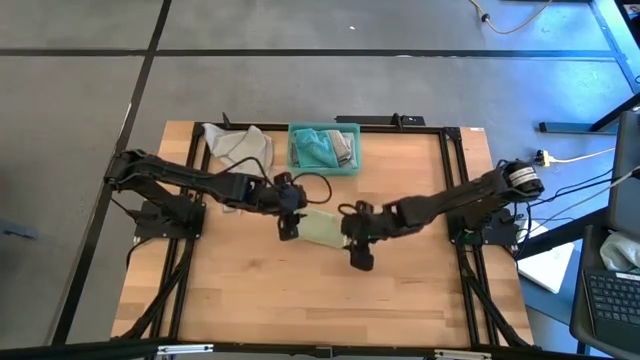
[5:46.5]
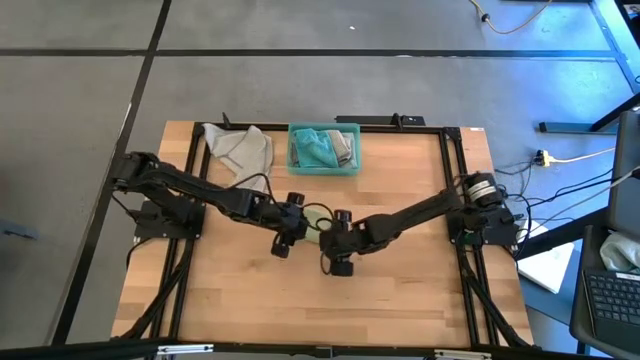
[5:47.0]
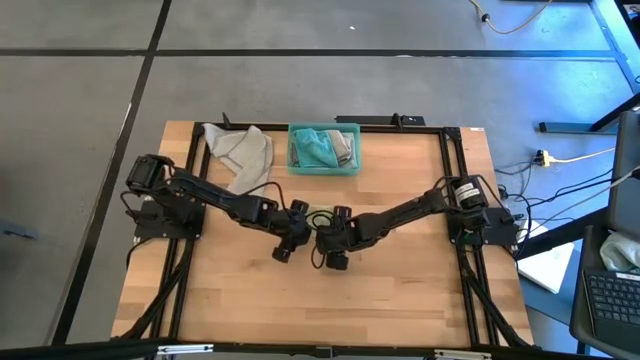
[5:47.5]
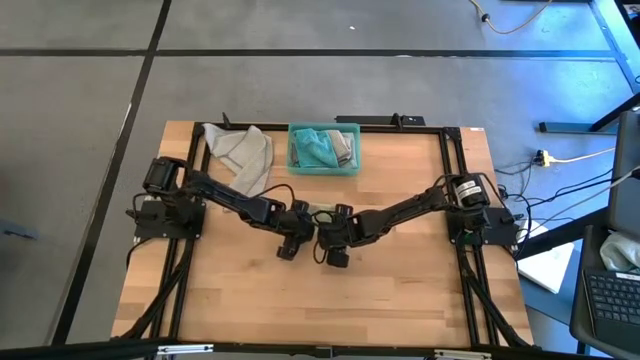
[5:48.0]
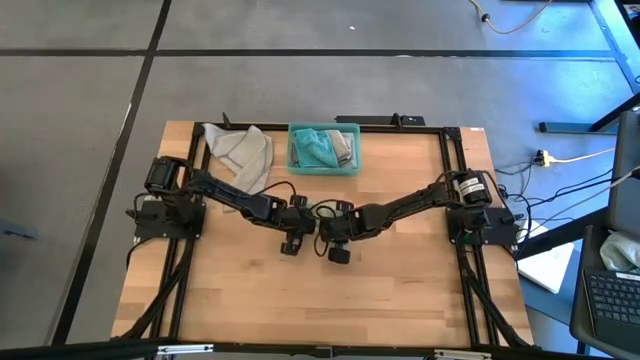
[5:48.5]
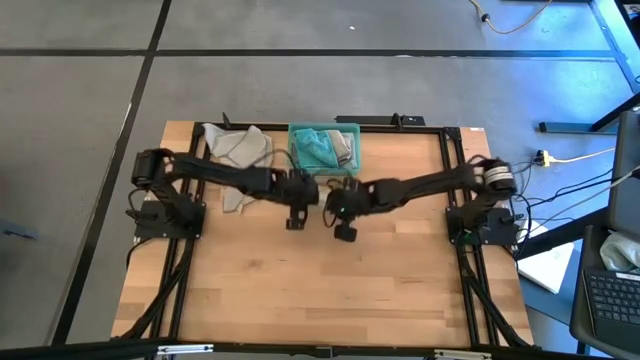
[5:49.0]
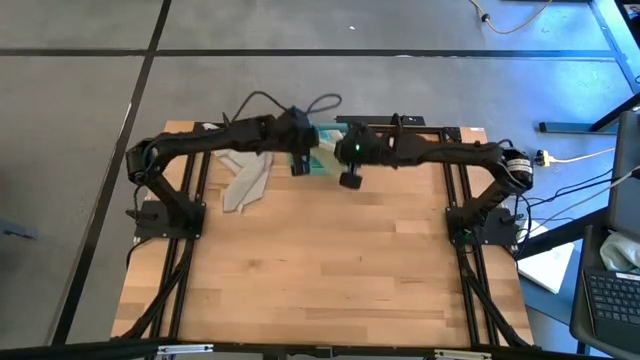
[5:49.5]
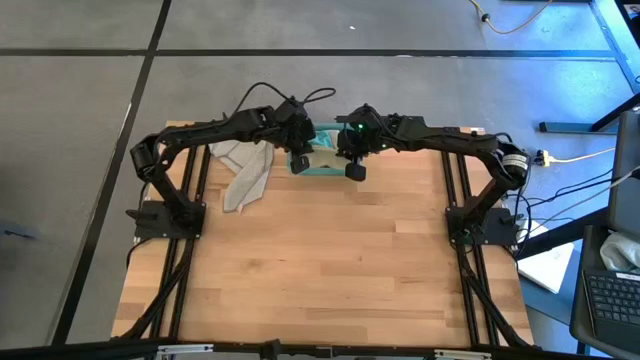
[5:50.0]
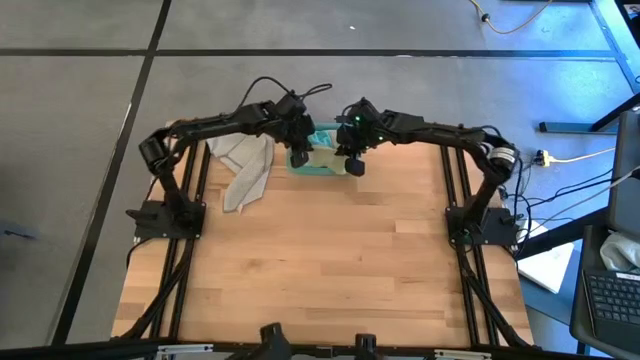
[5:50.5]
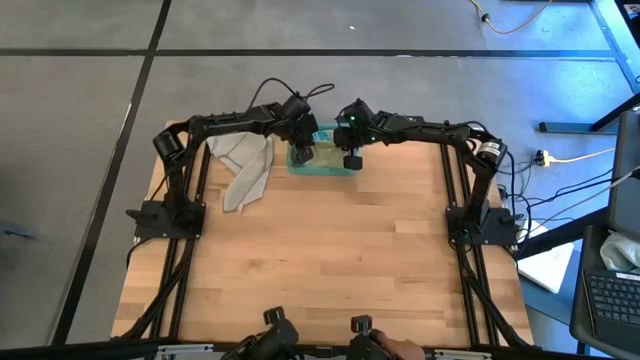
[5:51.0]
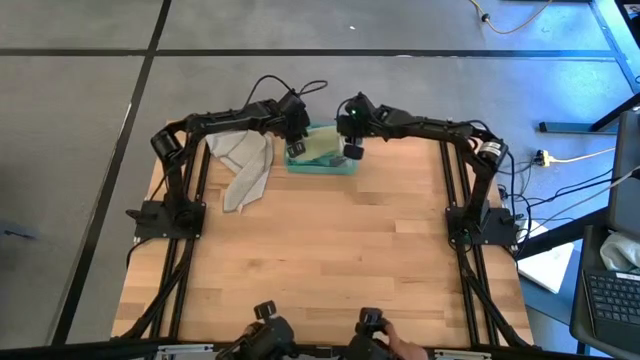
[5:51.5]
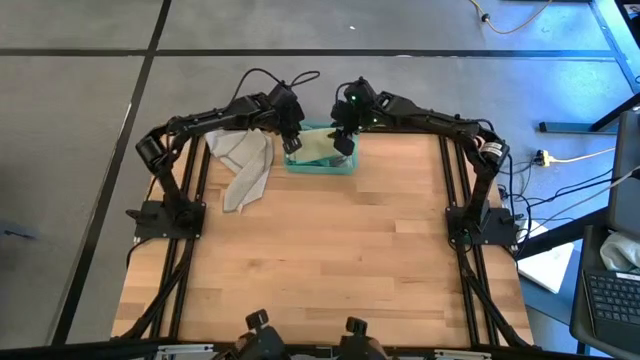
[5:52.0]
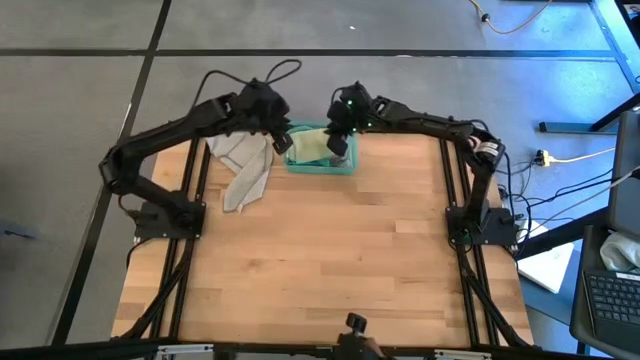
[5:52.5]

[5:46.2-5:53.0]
Task: Fold microfiber towels
Put the folded green towel into the bin

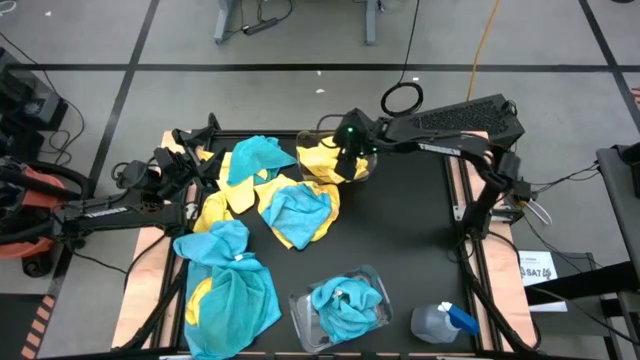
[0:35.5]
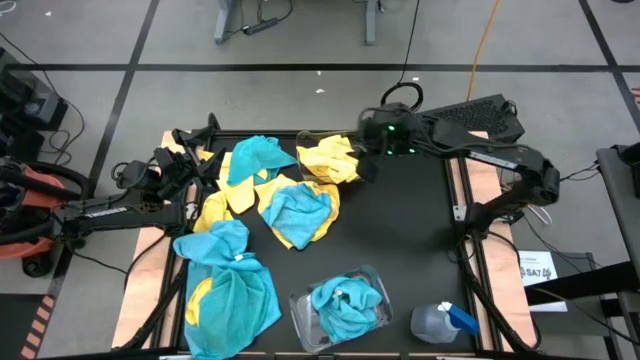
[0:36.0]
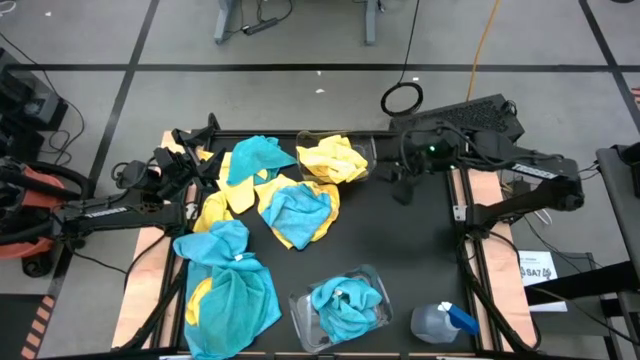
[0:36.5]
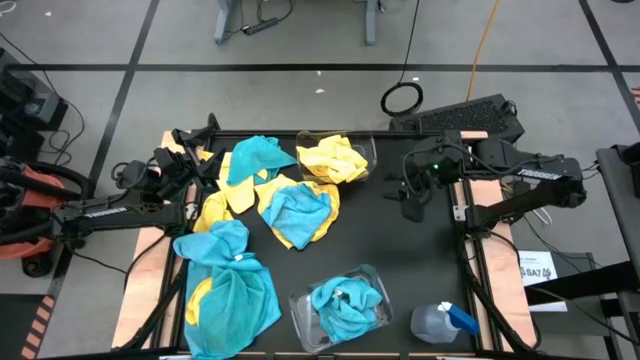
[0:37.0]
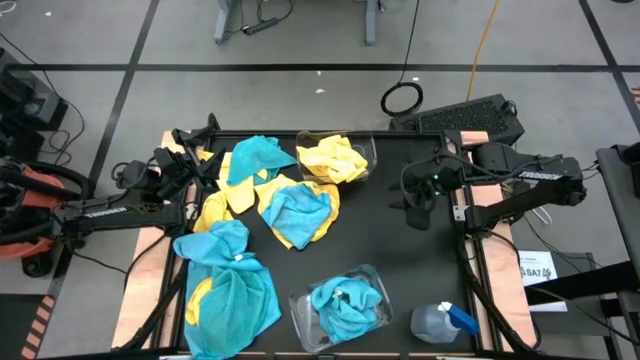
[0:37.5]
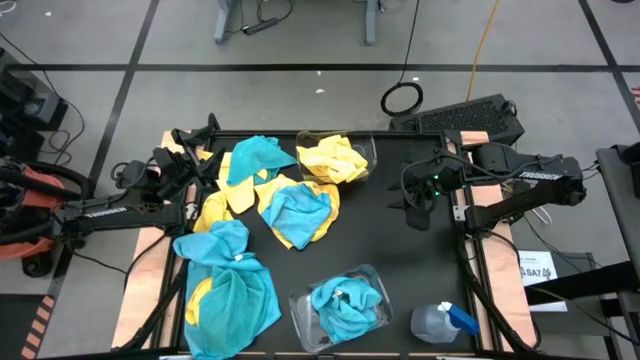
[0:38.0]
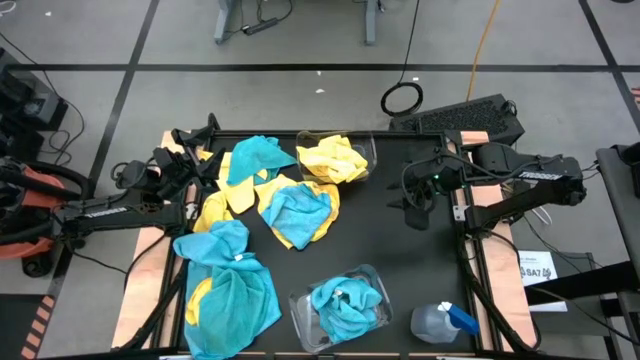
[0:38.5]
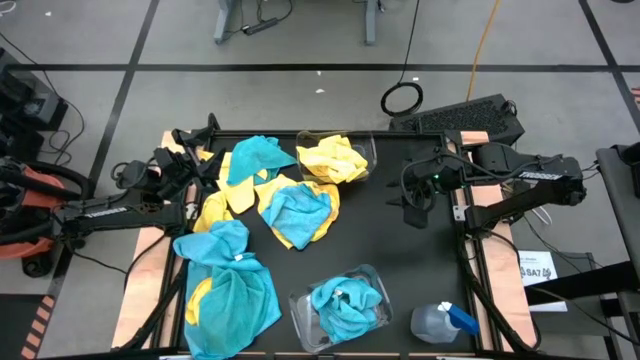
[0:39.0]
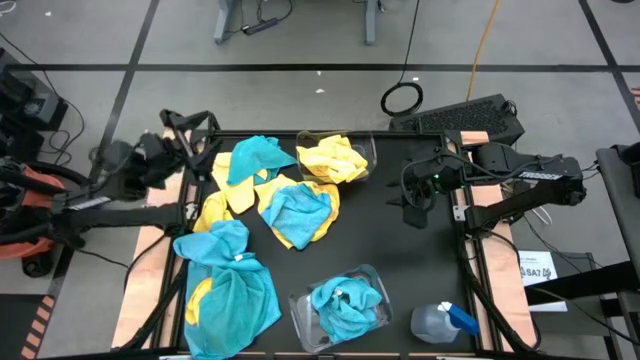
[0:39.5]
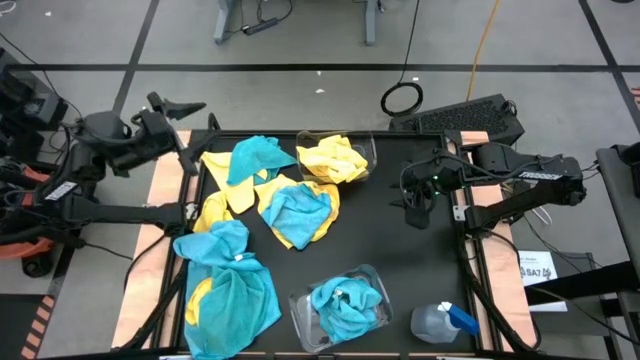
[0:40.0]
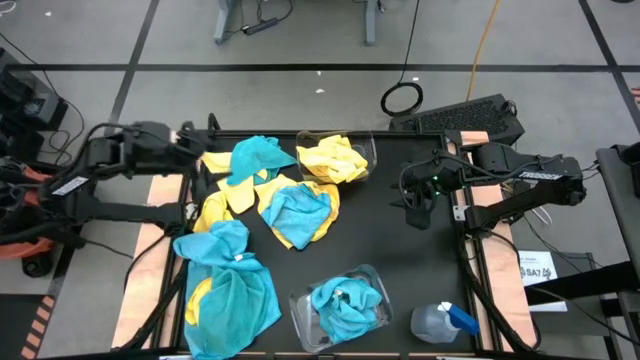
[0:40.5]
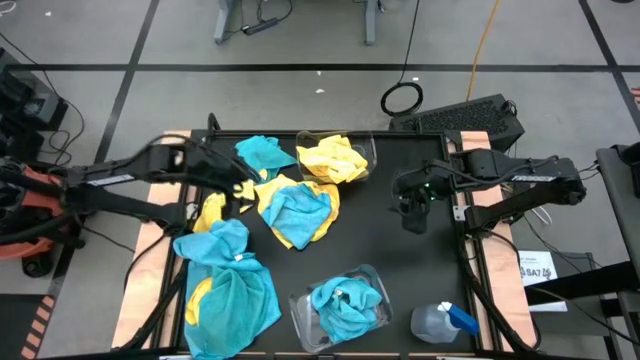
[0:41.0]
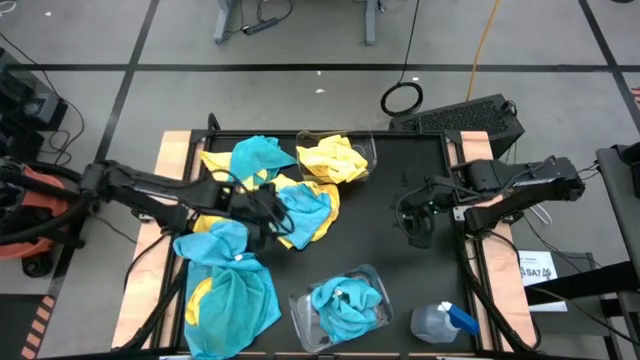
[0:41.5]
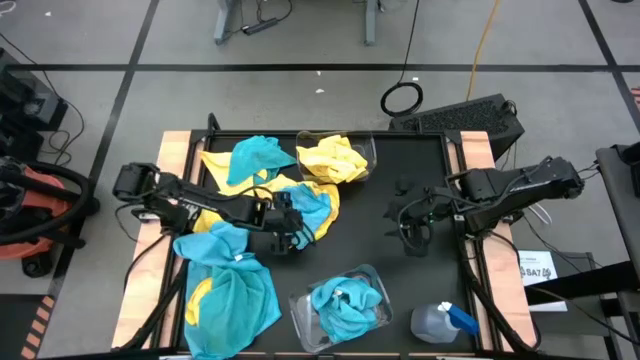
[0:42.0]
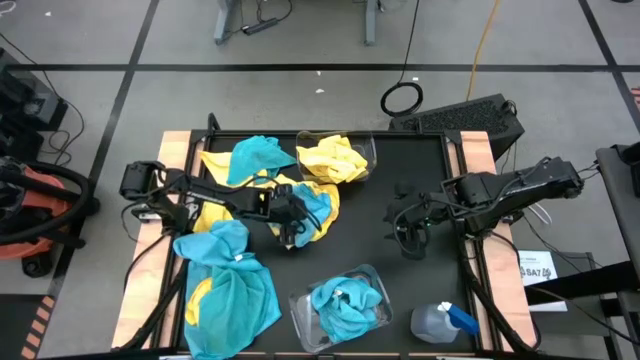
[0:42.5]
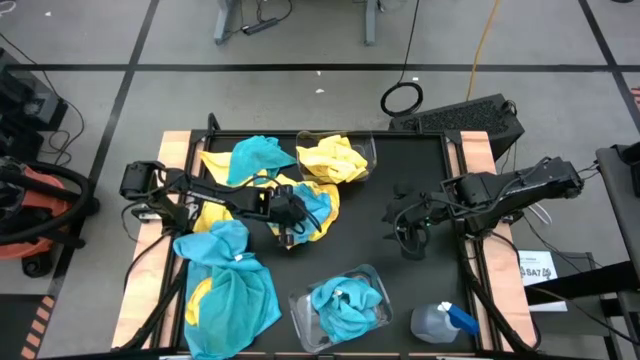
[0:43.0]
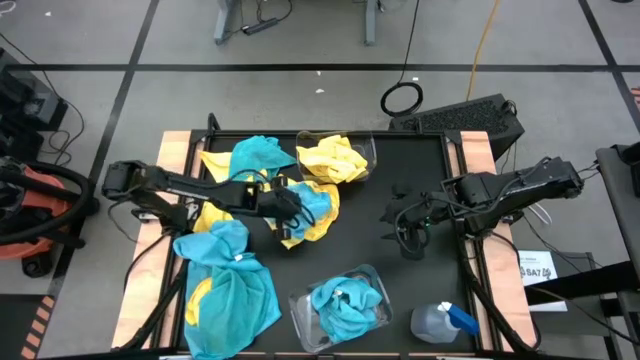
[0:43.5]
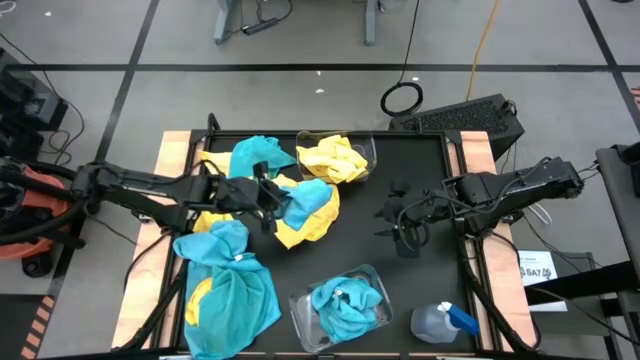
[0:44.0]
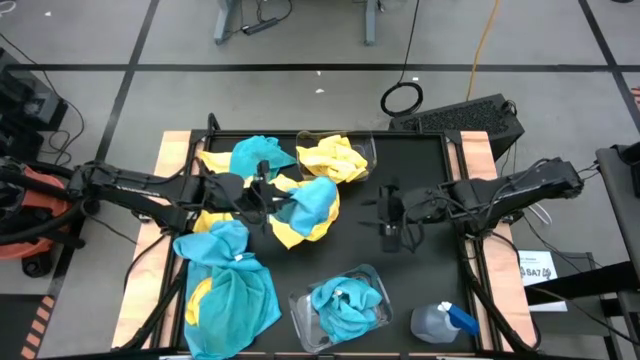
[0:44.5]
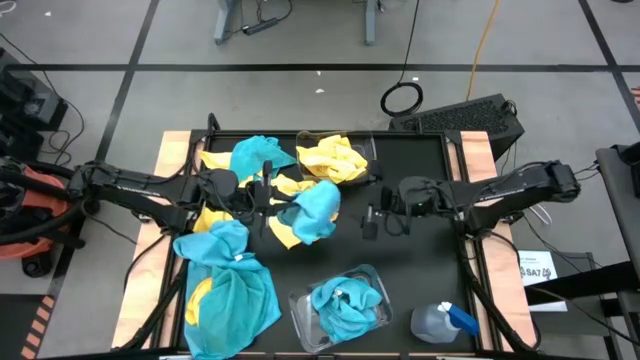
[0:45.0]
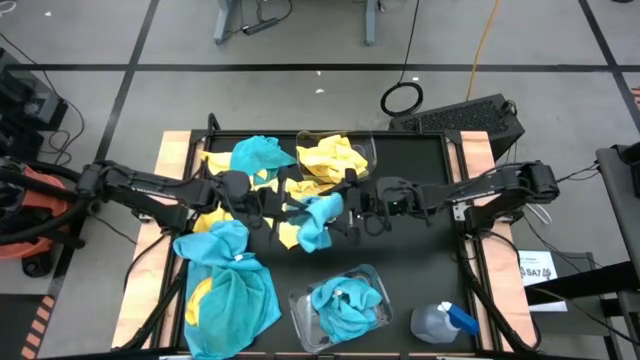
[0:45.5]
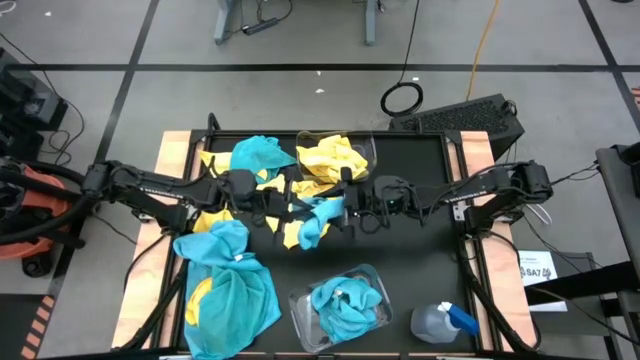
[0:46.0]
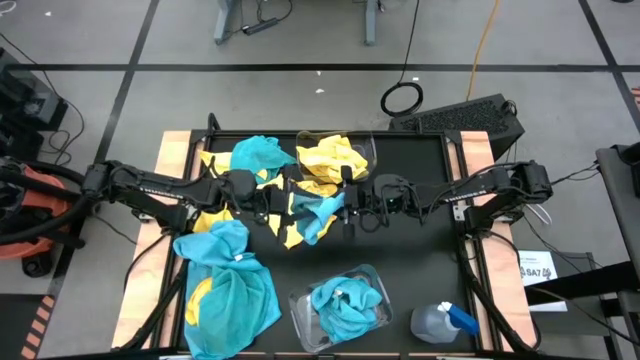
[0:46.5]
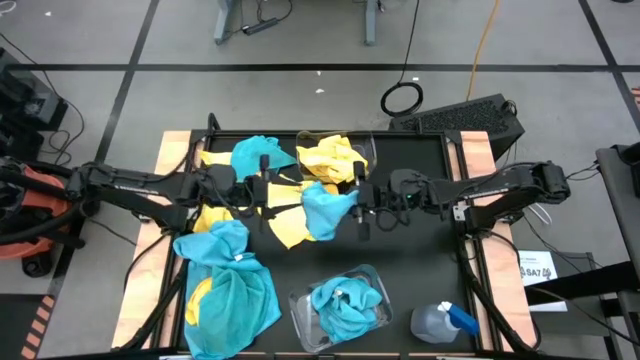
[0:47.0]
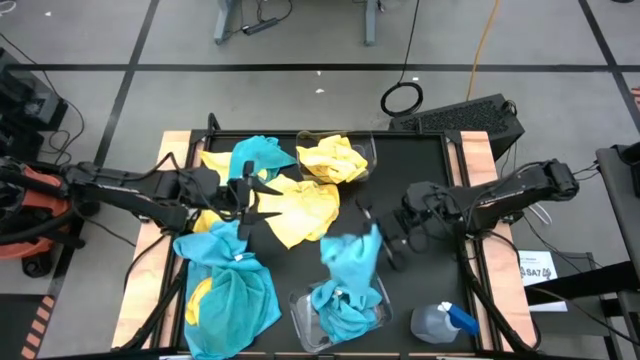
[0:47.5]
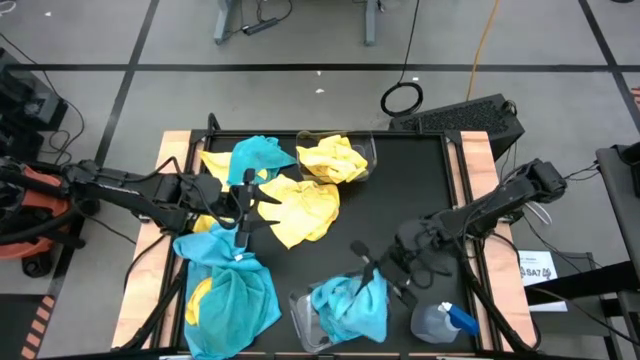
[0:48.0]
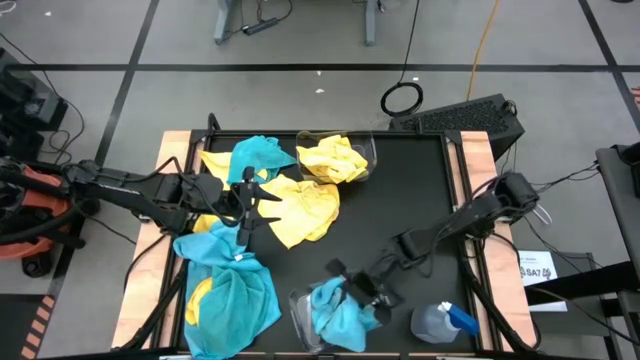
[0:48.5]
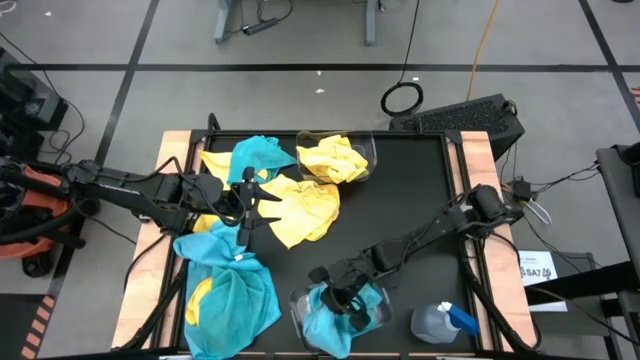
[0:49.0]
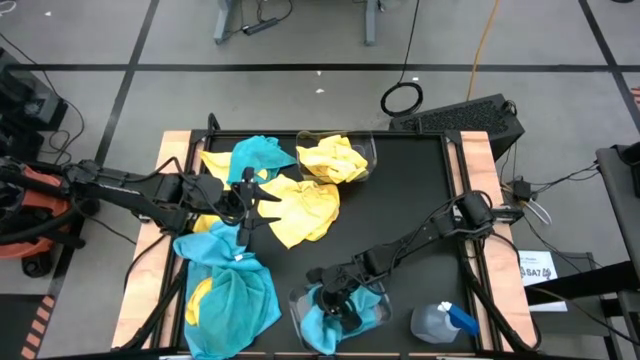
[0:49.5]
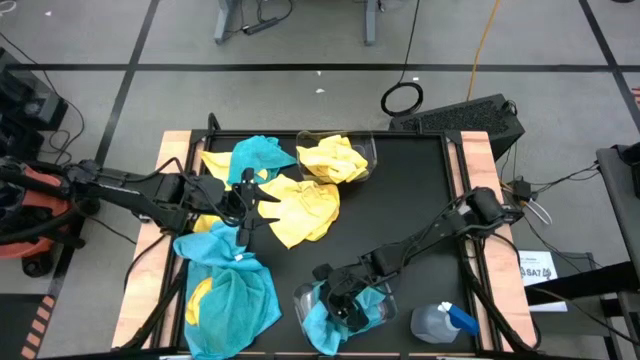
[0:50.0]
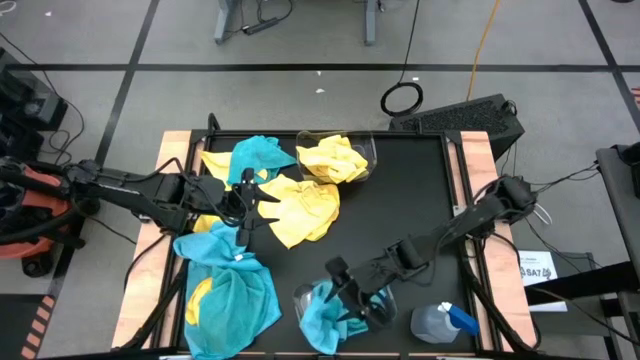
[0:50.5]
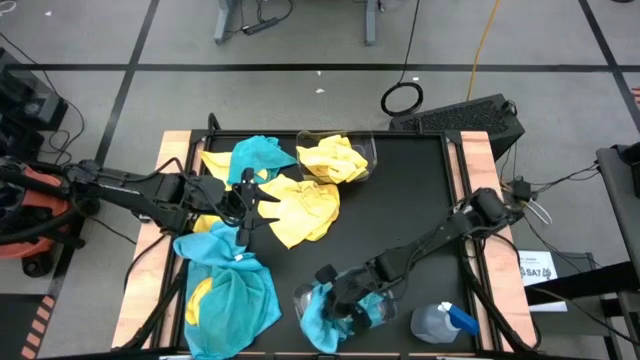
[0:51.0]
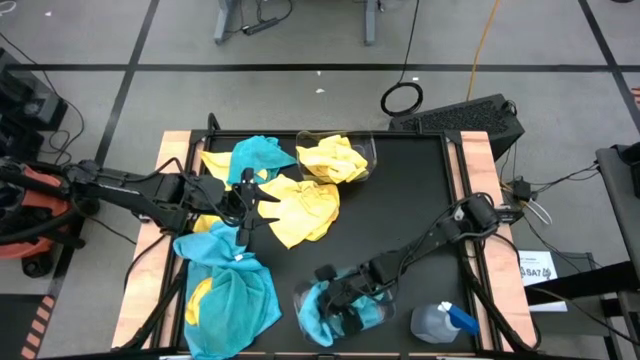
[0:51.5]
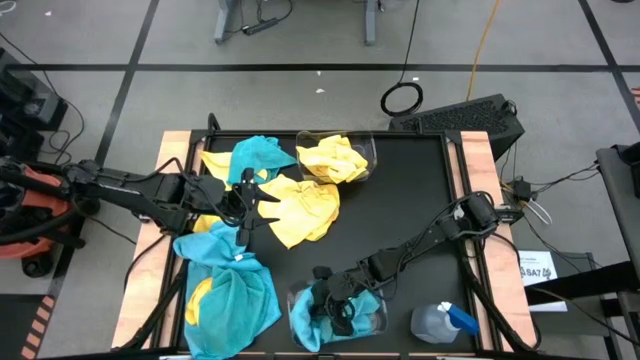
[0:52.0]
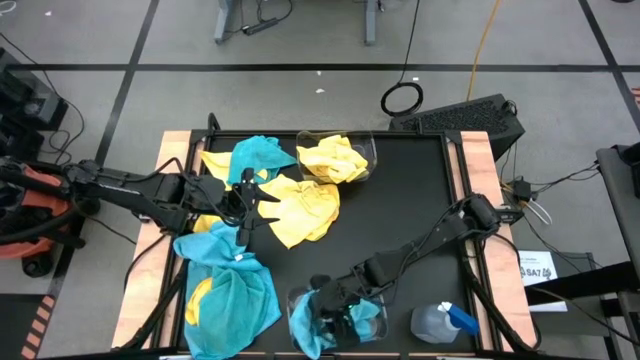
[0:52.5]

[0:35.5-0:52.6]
Task: Sort microfiber towel by color & place in baskets
Put the blue towel into the bottom transparent bin
